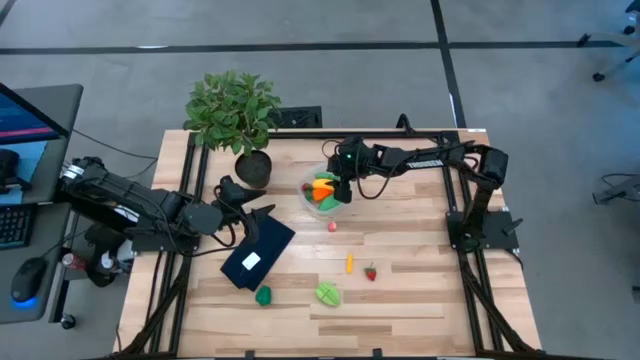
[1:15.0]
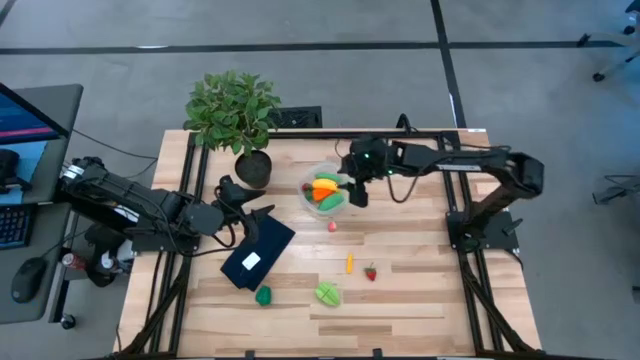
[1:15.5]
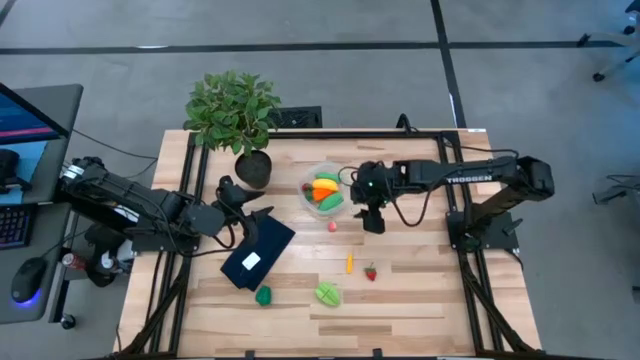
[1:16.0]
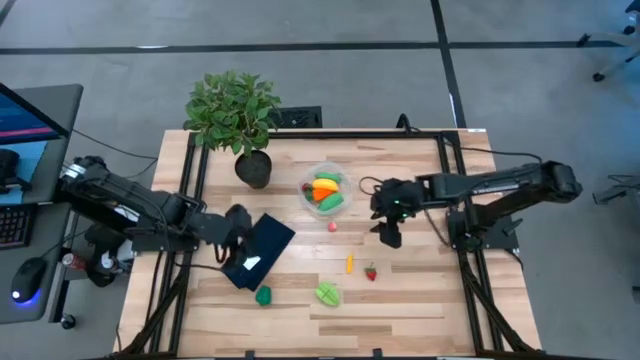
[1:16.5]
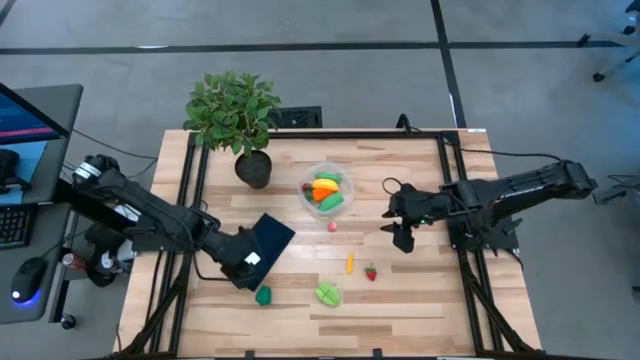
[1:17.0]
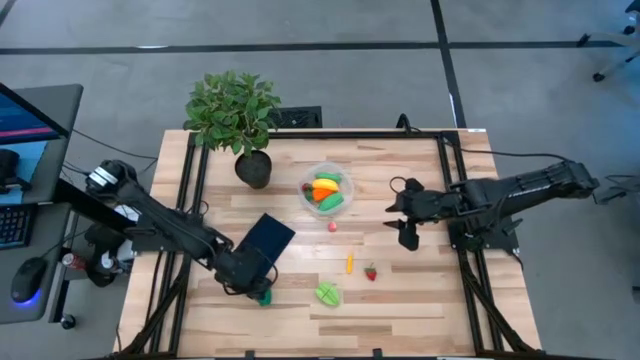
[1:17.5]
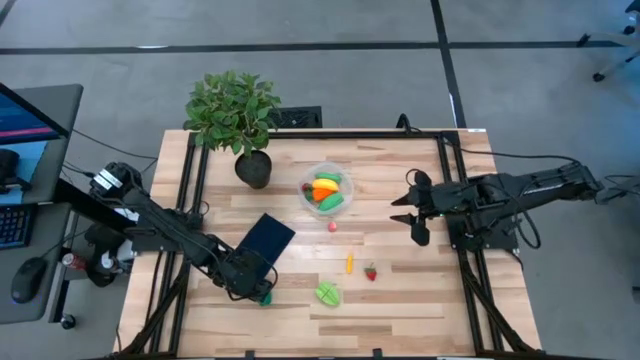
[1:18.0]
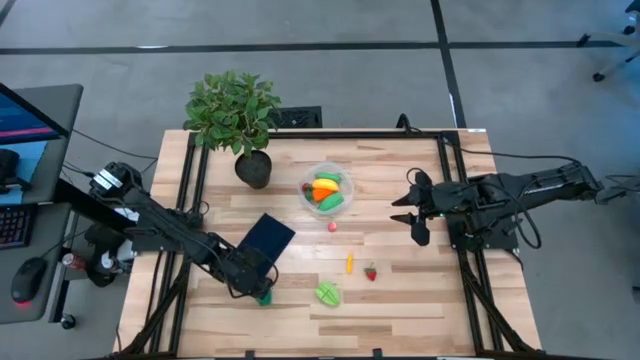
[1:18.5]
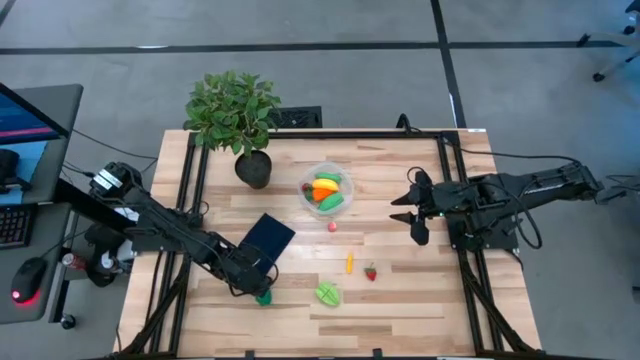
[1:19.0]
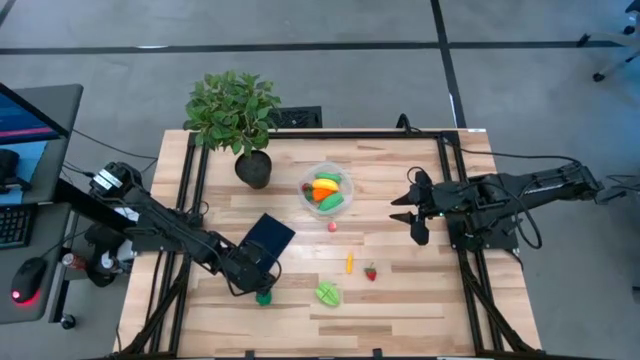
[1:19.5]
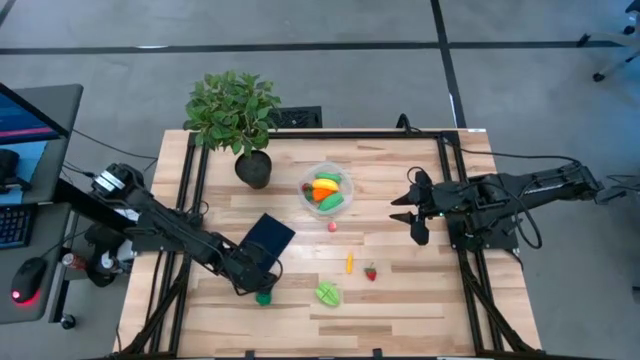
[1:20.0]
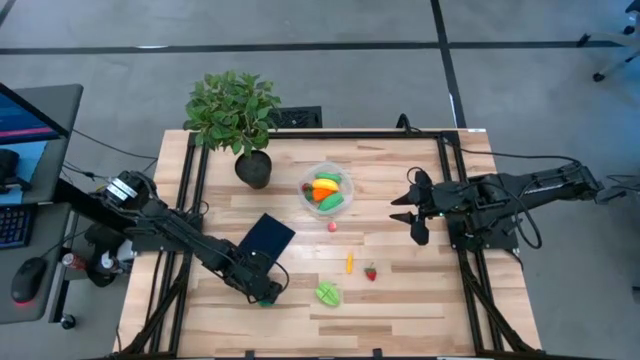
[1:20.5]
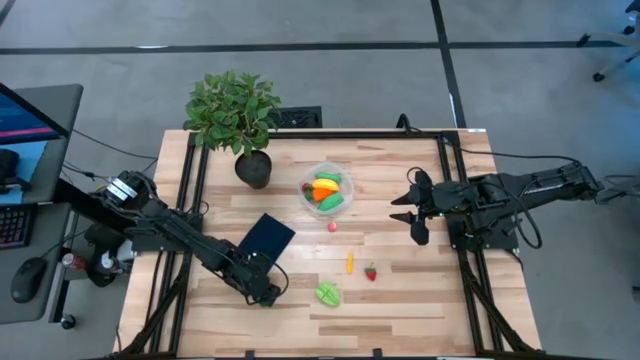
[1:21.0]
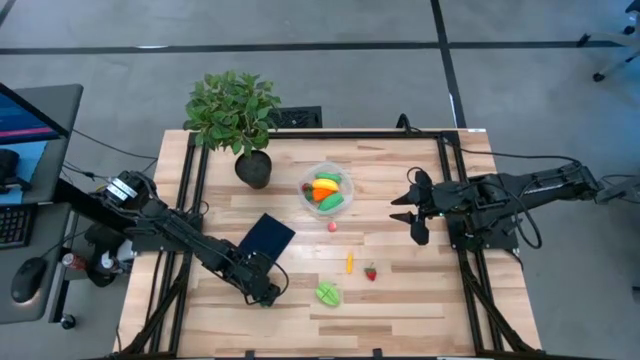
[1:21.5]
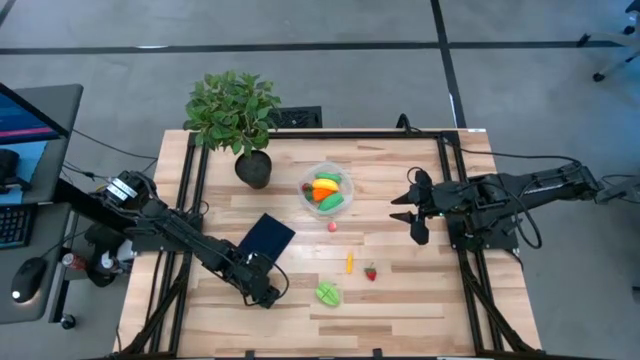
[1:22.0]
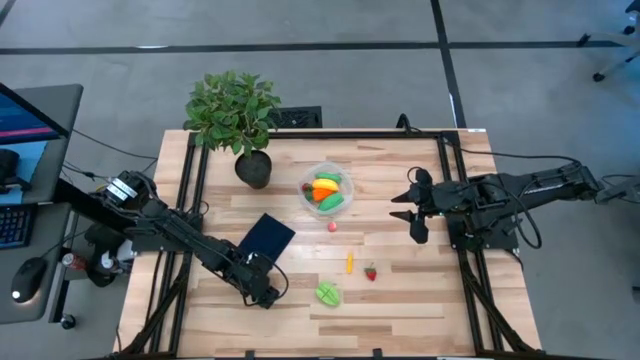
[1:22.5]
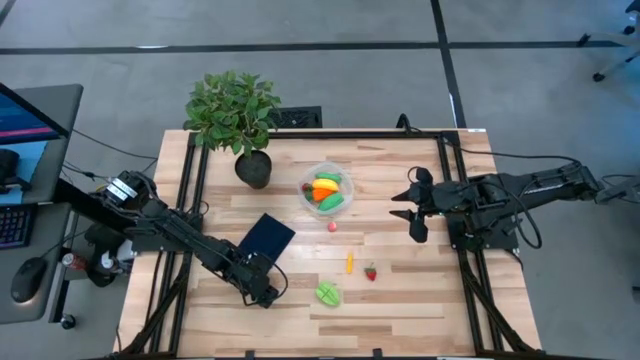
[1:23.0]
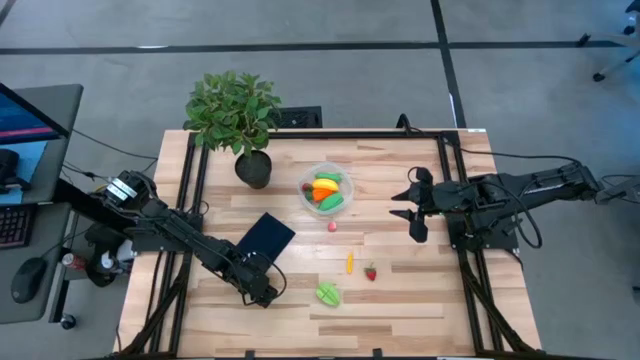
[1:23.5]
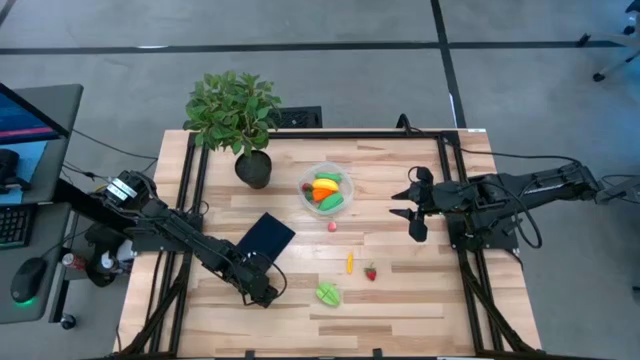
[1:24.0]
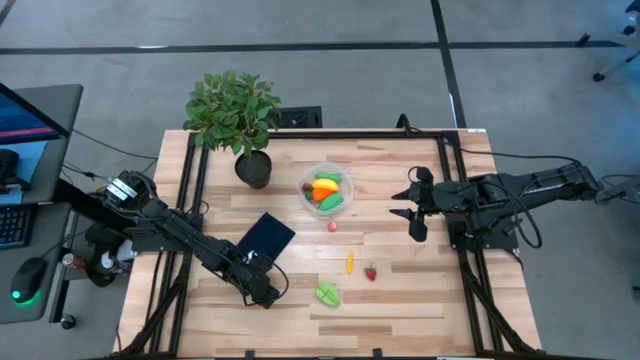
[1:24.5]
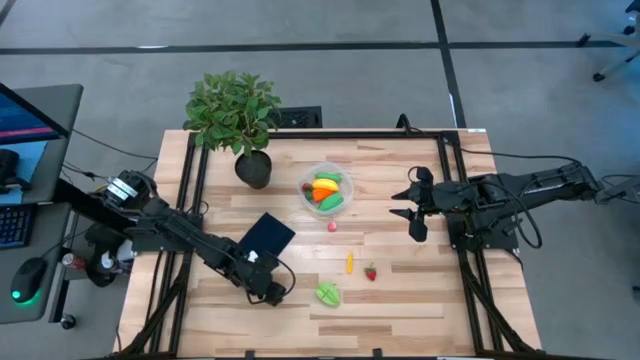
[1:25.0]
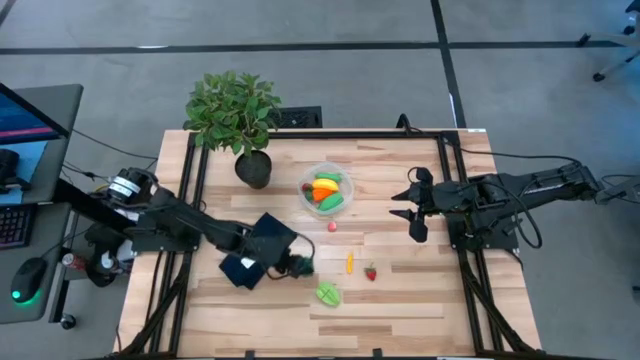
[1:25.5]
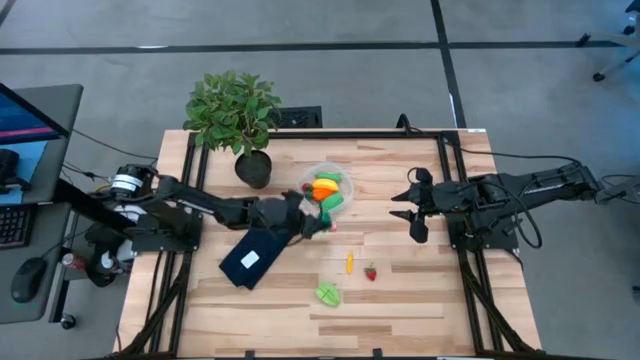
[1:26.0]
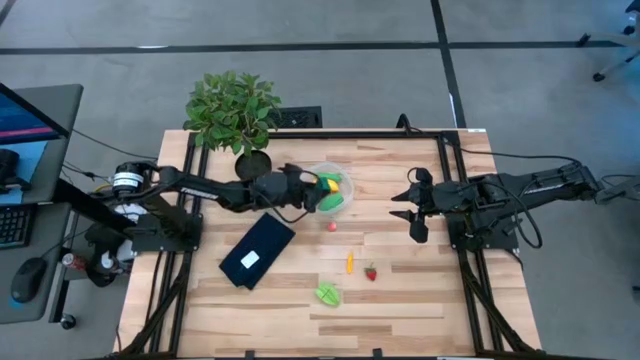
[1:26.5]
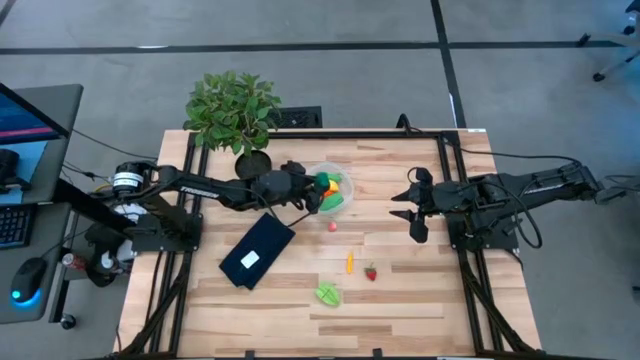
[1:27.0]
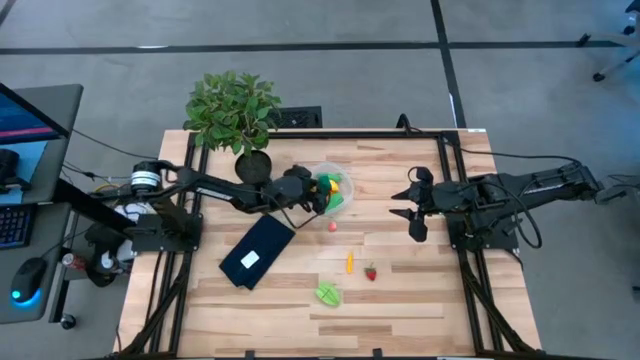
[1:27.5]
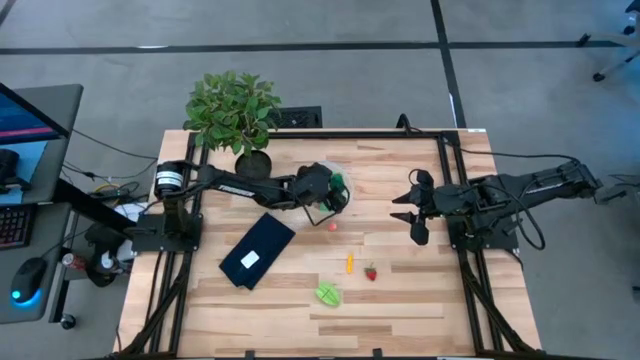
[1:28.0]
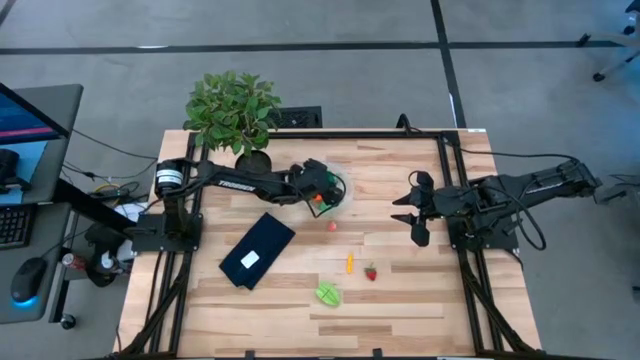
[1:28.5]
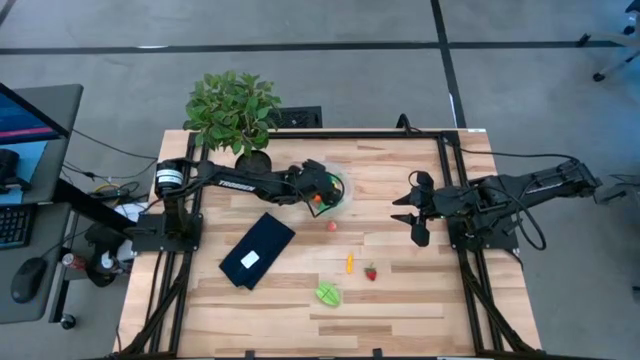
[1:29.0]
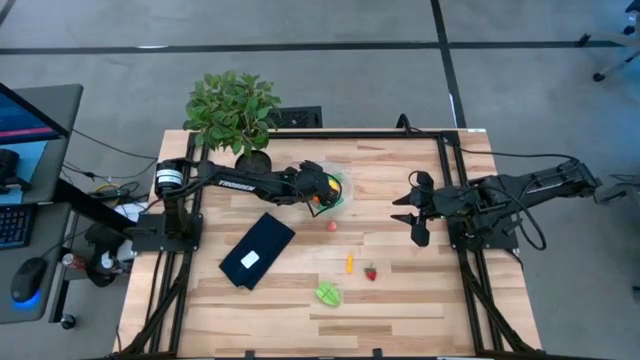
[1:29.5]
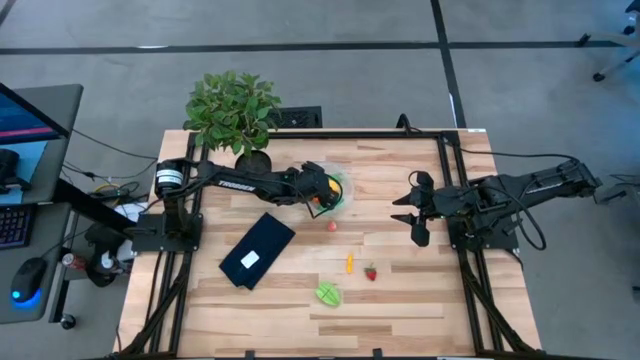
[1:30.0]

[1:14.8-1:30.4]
Task: Pick and placing Produce into tupperware
Put the green bell pepper into the transparent bin

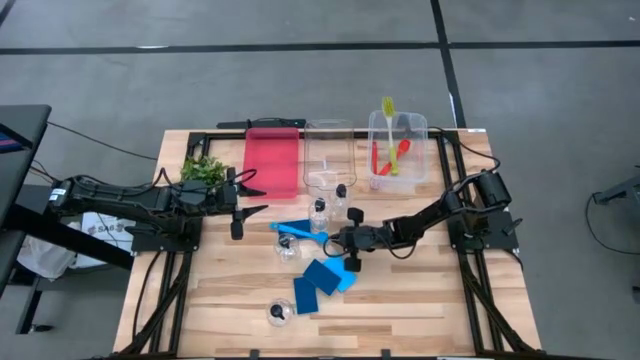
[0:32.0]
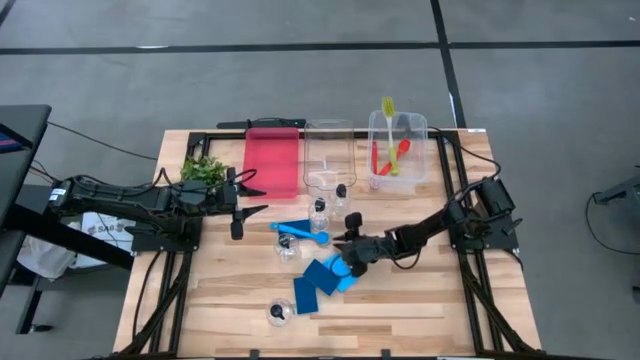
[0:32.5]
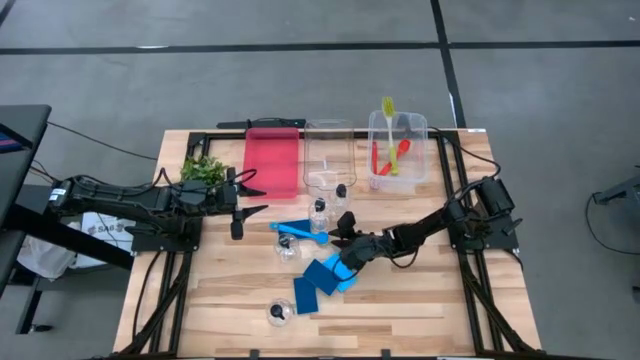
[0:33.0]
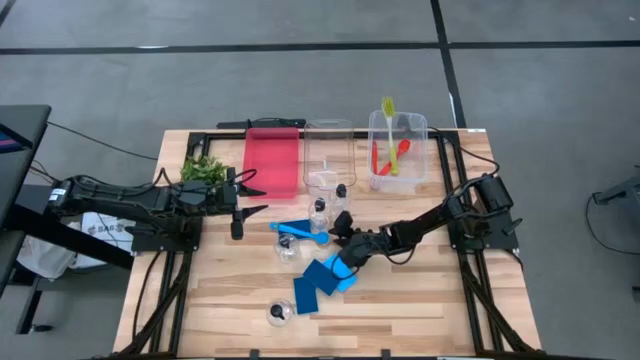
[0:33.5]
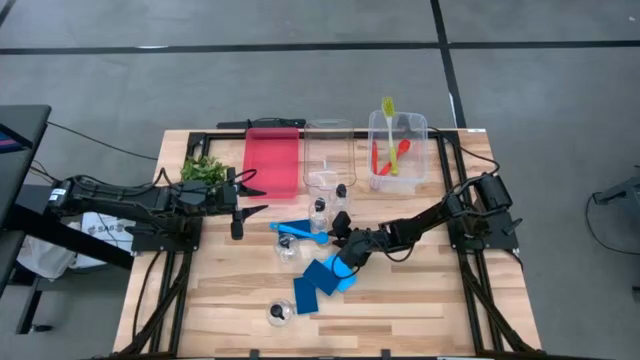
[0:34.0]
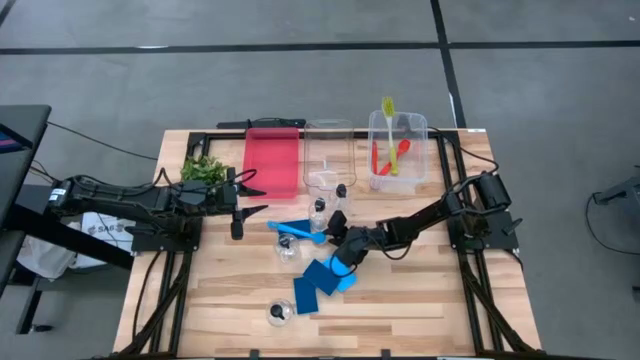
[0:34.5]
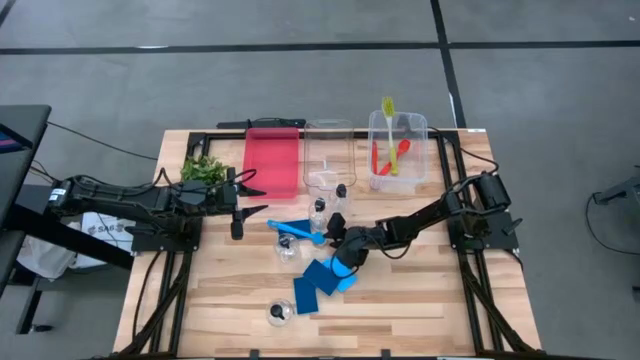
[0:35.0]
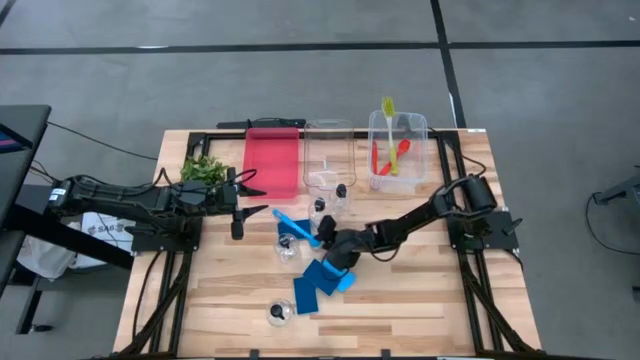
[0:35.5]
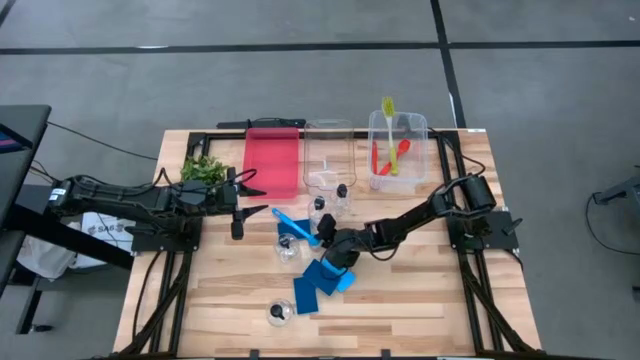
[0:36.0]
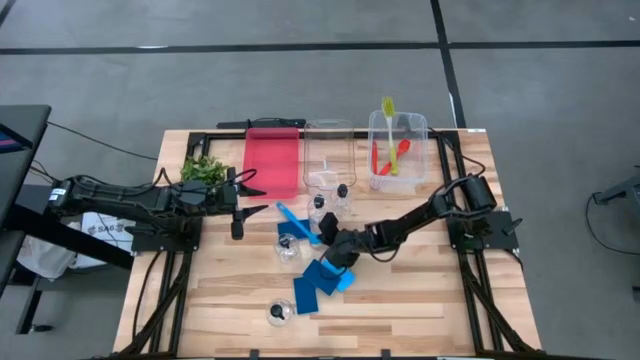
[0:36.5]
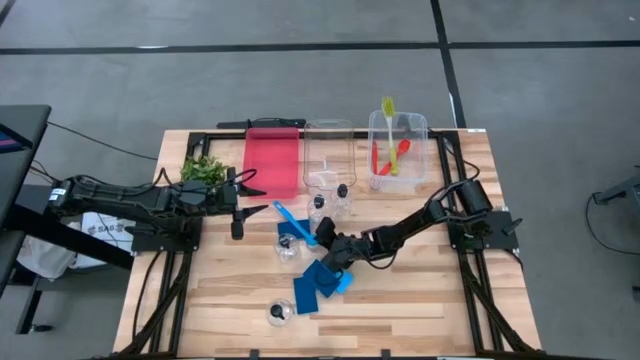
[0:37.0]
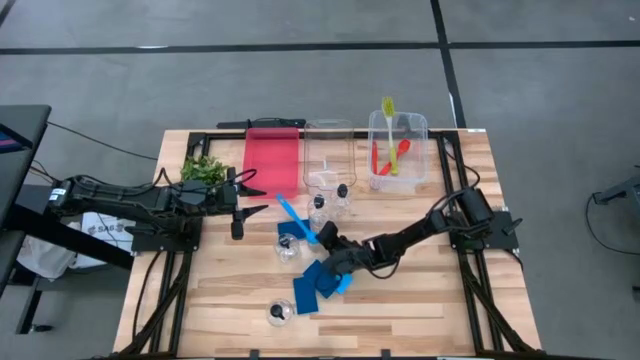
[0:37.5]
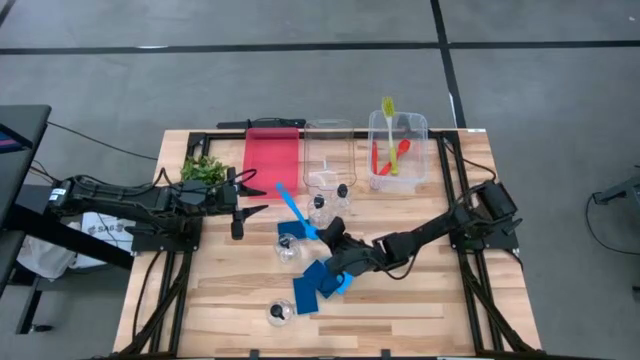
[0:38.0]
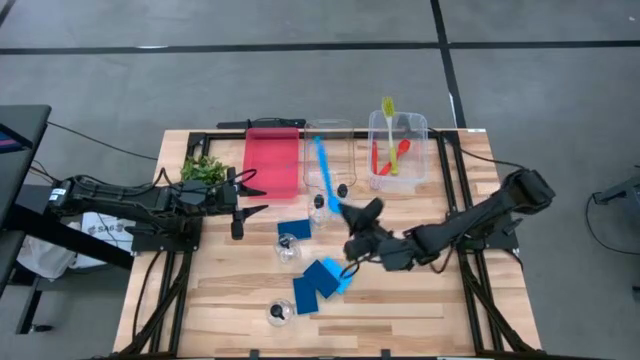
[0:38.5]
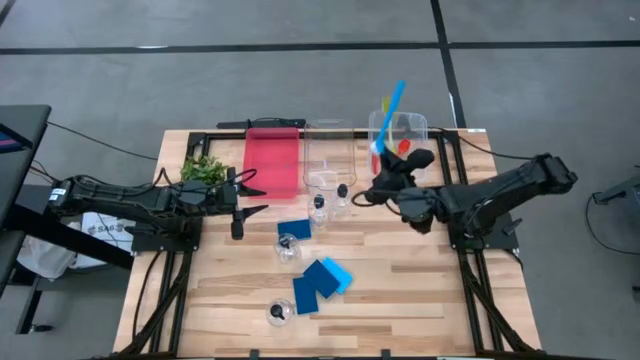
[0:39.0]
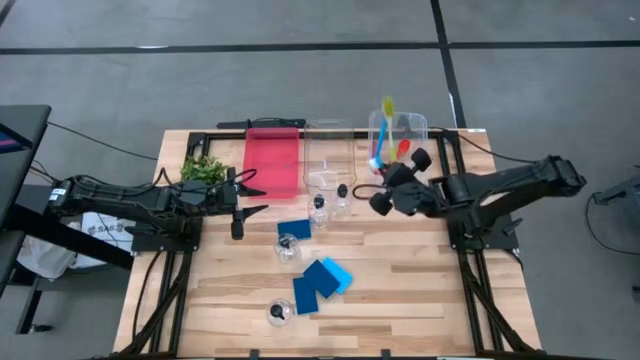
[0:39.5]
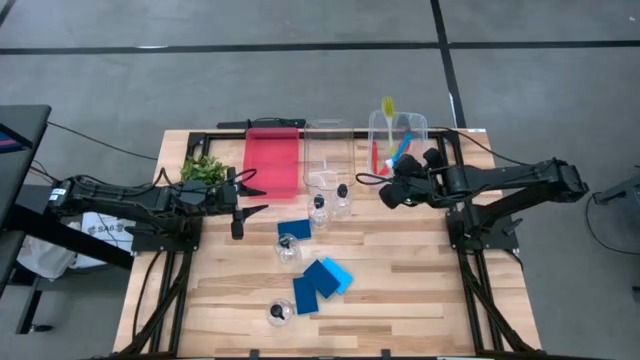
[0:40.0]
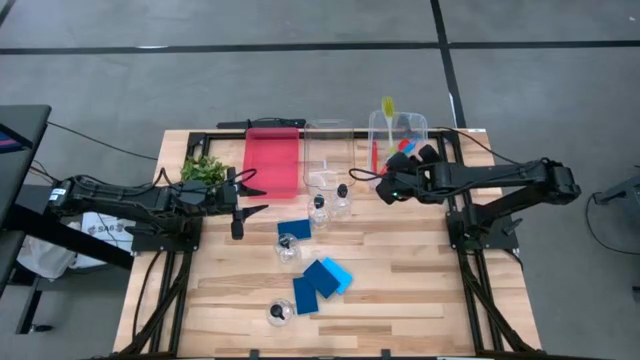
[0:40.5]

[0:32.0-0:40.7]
Task: Pick & Place Kitchen Sink Supplies
Put the blue dish brush into the right transparent bin
